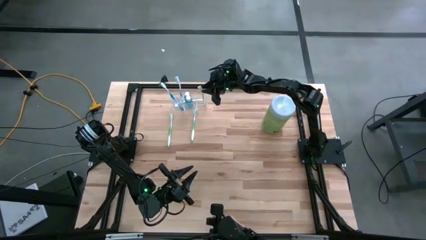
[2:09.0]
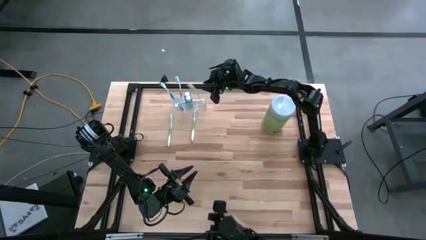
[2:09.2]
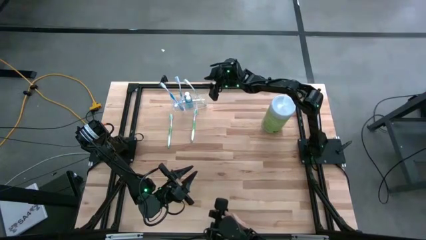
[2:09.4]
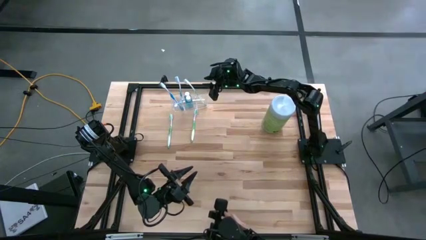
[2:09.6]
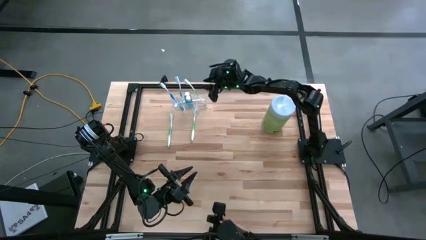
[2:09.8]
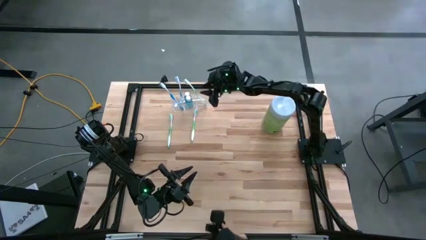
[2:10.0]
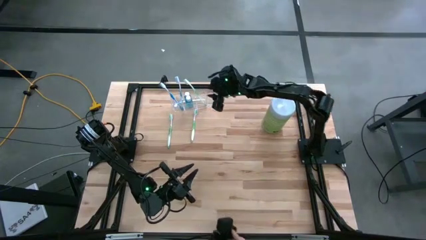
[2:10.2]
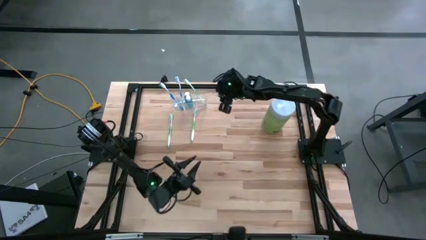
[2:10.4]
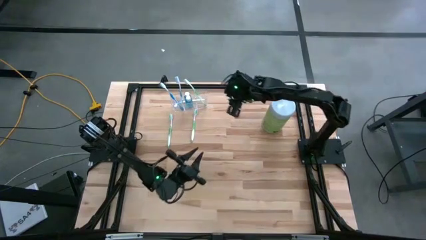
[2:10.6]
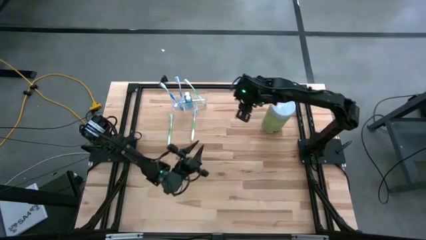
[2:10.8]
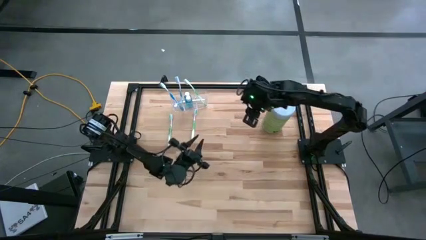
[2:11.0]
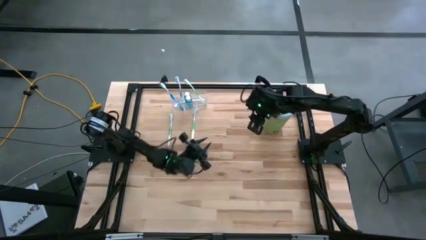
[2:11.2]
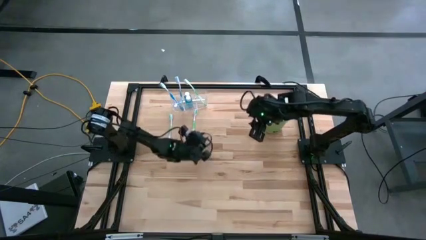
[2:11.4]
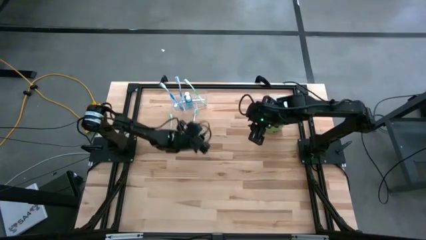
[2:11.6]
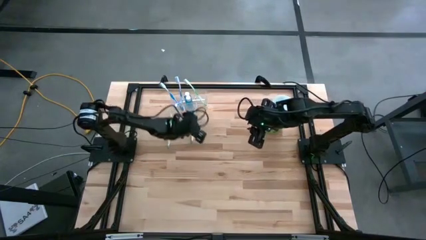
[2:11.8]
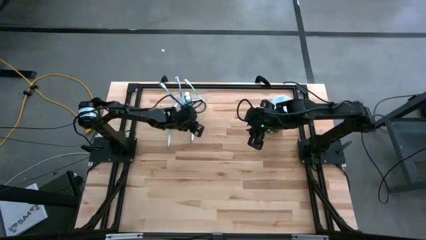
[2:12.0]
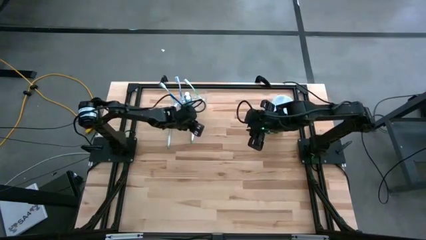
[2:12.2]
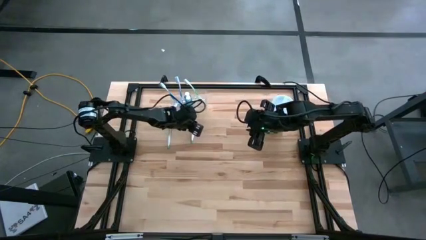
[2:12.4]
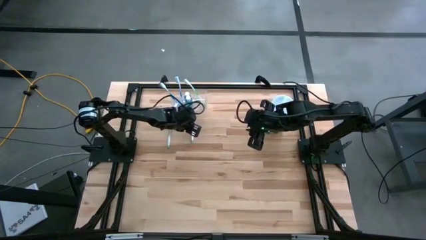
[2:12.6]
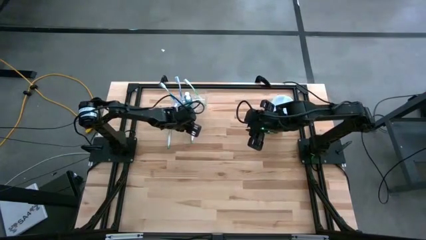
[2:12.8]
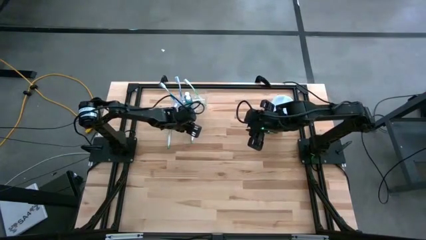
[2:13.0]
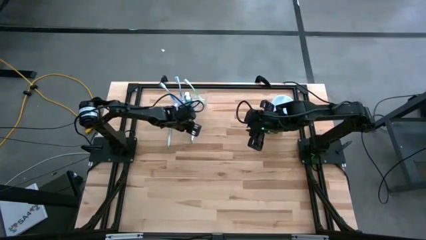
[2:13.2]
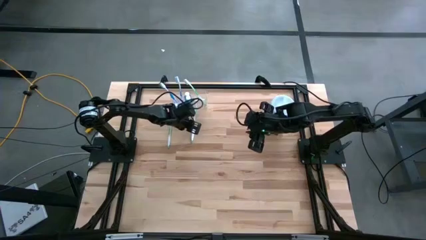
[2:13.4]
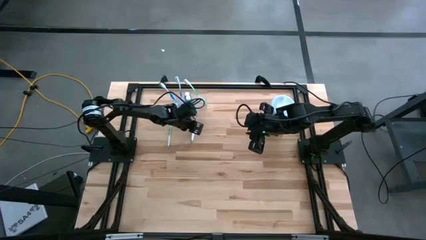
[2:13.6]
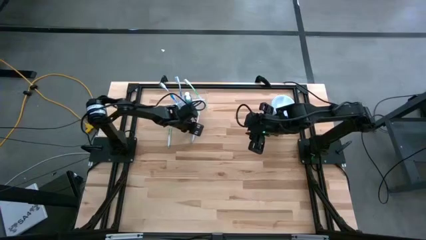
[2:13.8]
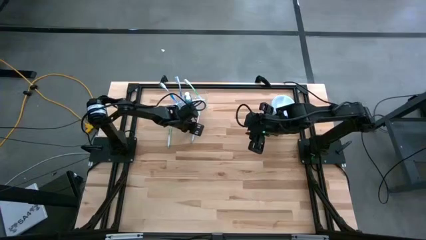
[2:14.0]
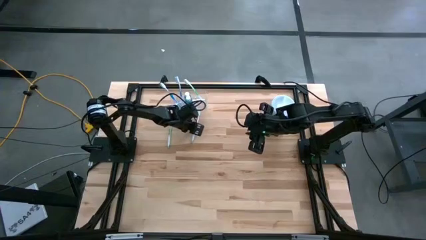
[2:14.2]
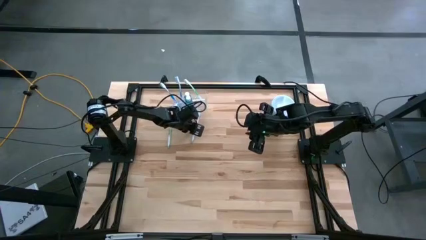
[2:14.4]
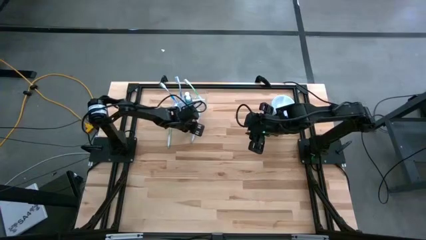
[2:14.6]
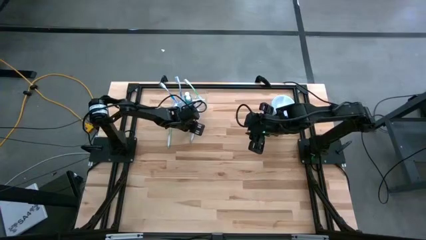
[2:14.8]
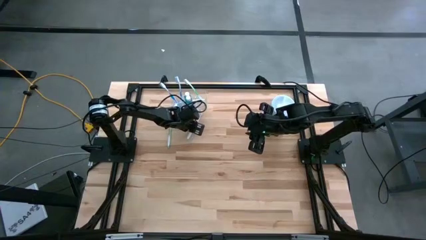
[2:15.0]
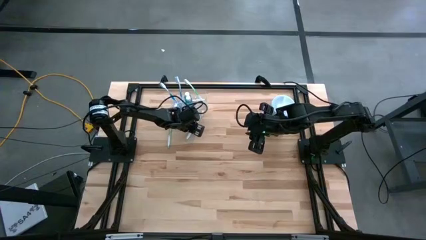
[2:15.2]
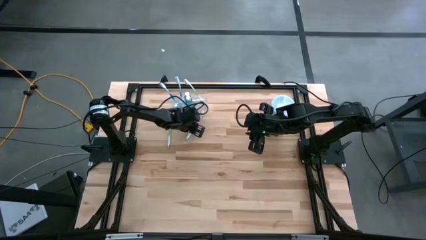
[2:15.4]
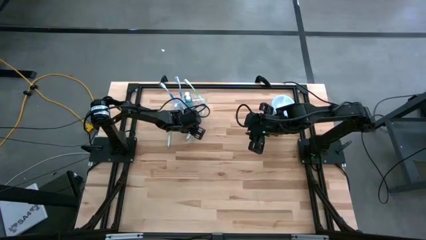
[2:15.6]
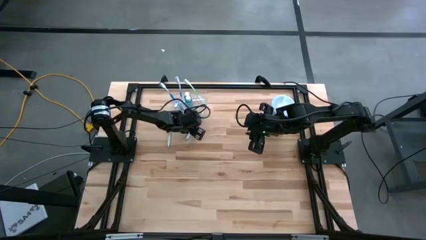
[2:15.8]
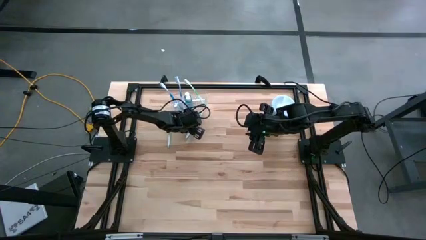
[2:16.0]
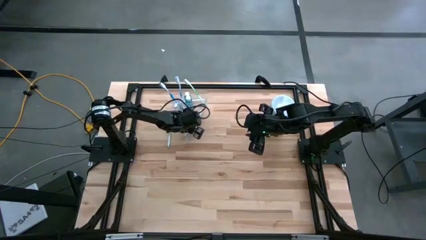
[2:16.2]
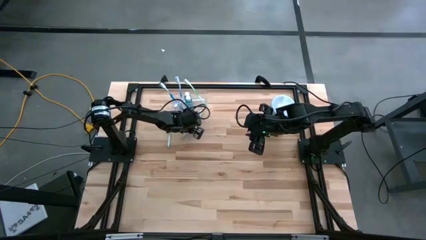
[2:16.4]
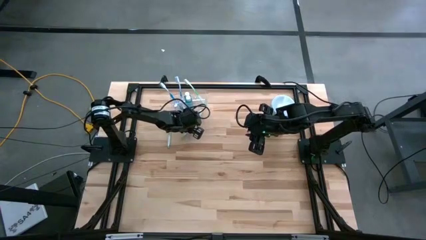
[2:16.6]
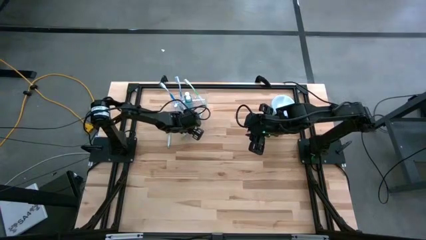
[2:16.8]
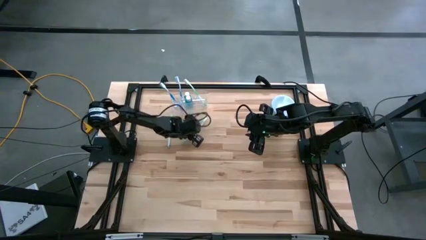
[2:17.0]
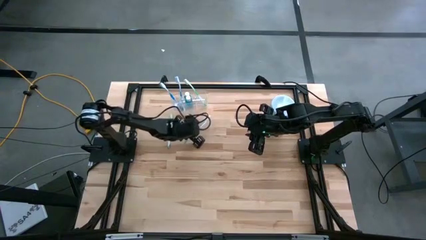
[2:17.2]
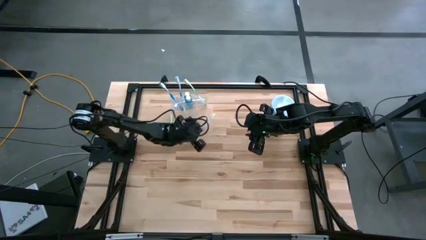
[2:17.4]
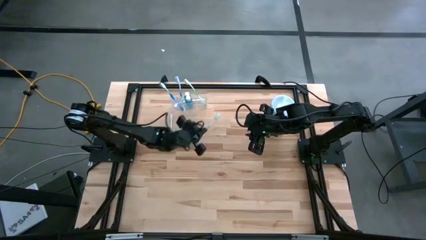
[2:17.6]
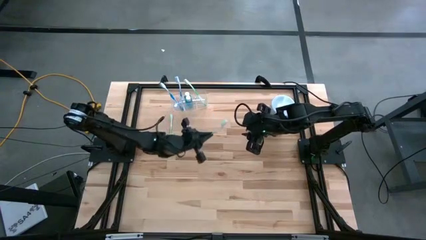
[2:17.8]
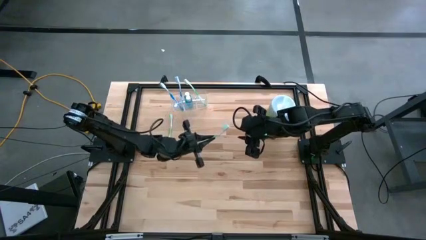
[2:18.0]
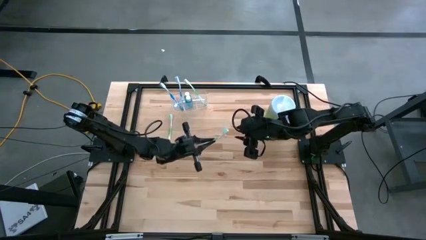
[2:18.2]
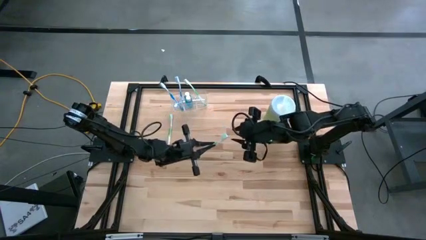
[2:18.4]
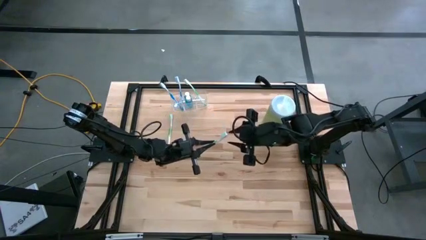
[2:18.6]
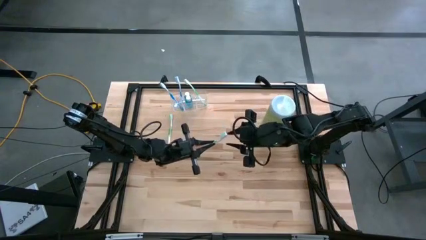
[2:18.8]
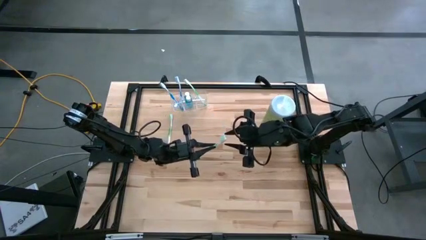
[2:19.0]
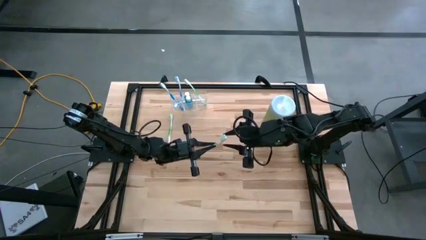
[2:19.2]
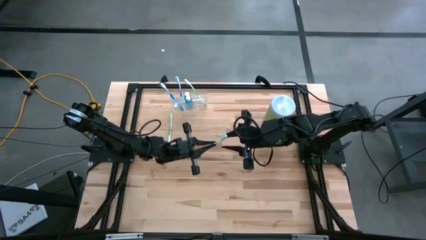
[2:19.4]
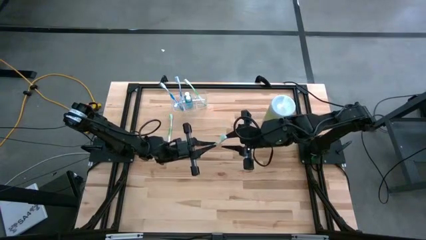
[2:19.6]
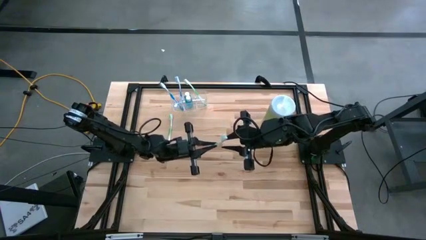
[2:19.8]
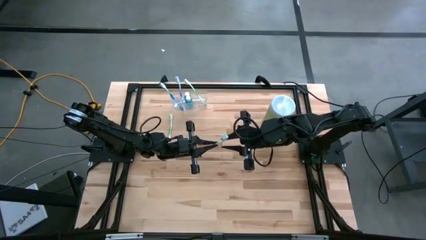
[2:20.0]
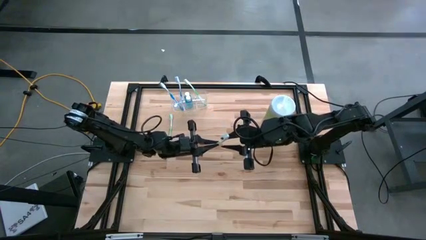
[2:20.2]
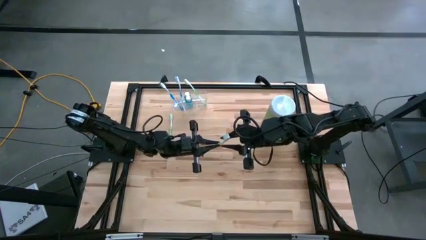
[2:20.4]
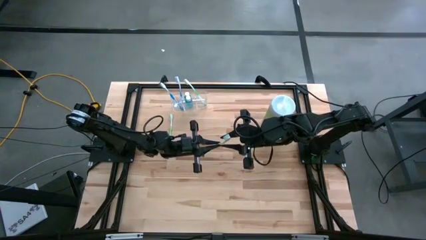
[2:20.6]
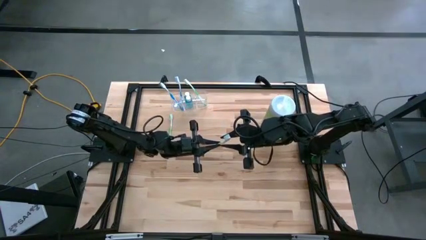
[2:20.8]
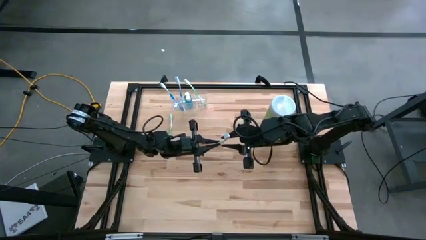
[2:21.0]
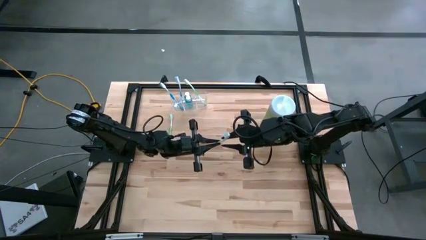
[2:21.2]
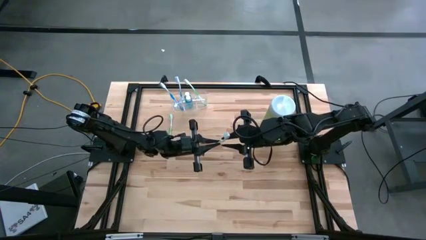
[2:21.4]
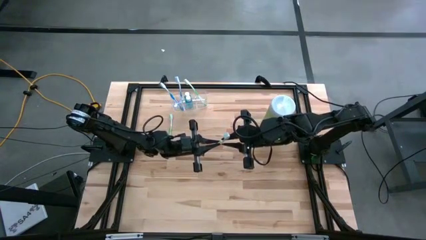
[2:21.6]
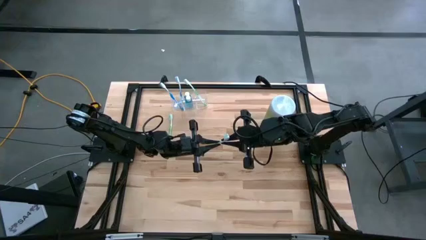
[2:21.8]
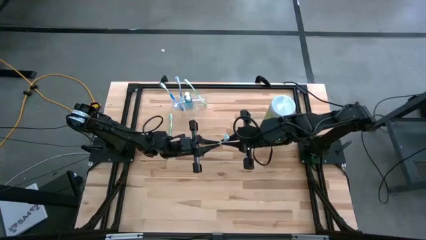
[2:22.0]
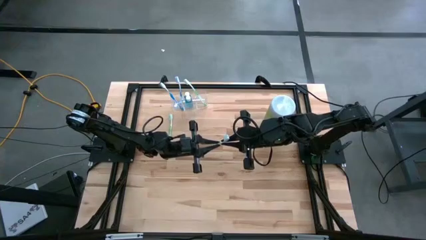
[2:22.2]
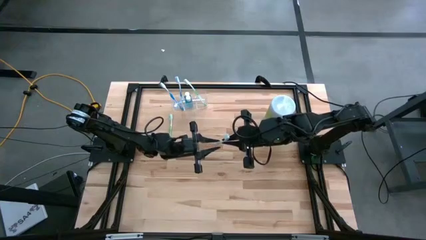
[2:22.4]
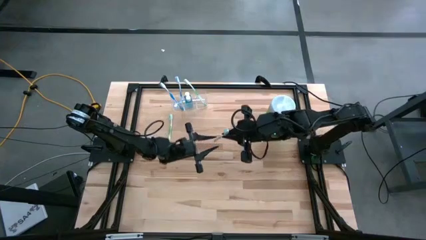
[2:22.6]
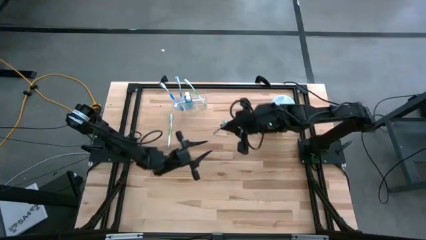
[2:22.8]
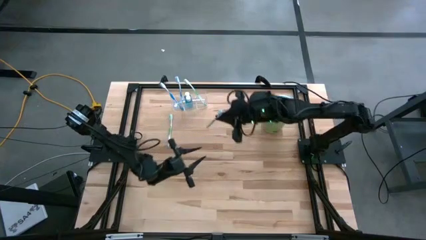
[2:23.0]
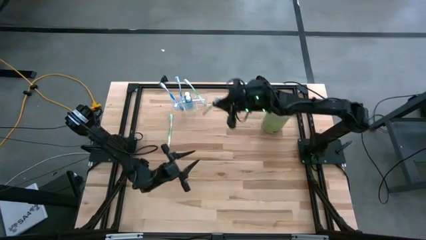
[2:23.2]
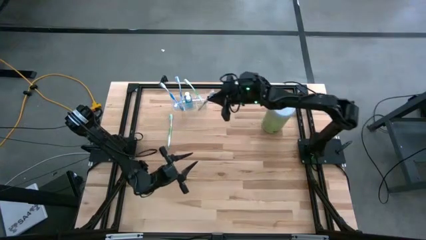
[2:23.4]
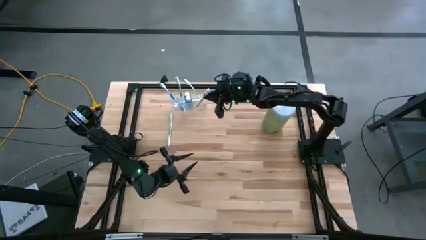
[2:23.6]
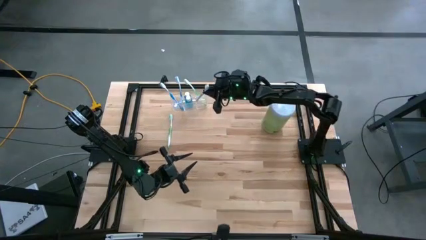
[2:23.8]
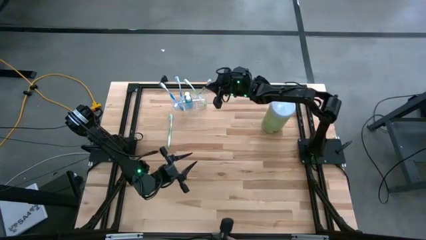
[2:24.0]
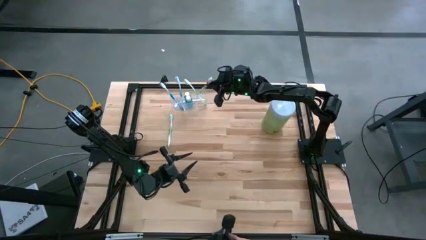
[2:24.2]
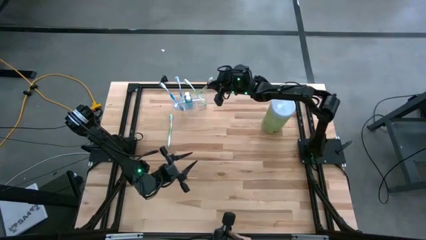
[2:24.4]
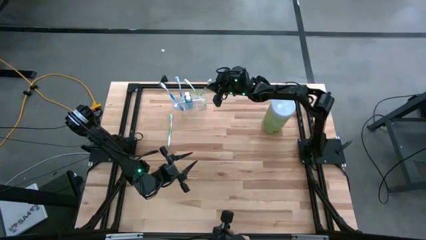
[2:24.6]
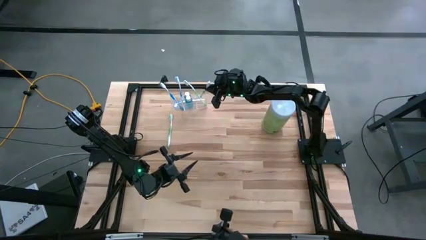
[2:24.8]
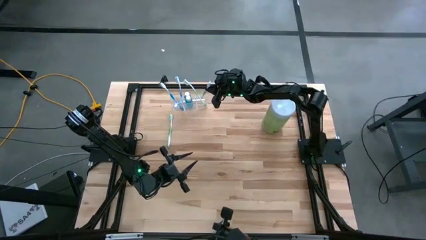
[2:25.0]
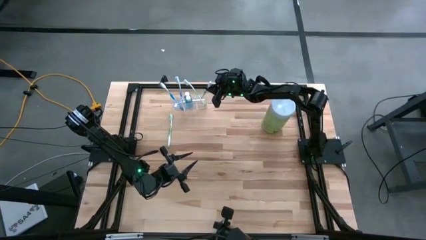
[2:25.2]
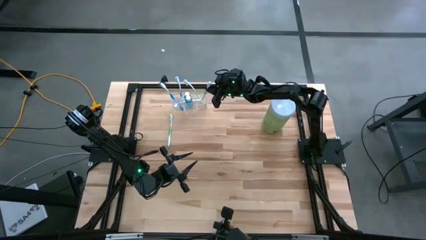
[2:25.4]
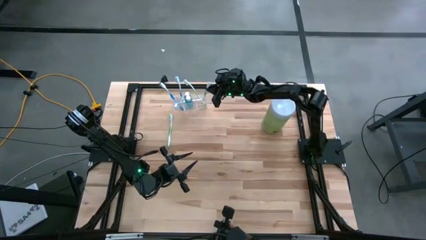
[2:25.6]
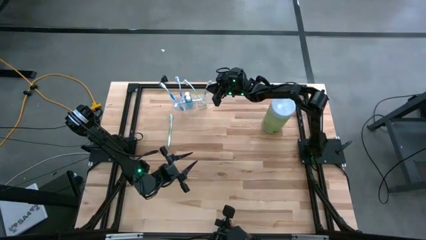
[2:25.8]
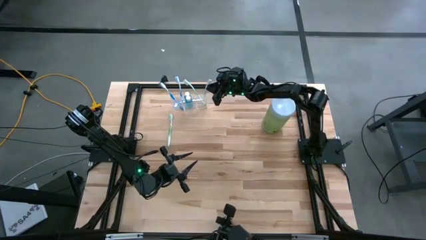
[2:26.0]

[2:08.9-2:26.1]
Task: Pick & Place toothbrushing station
Put the right green toothbrush into the right section of the transparent organizer
